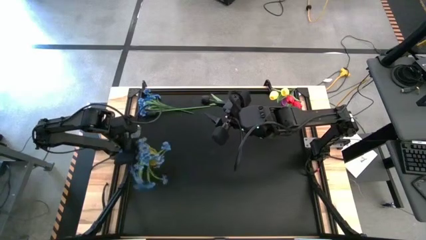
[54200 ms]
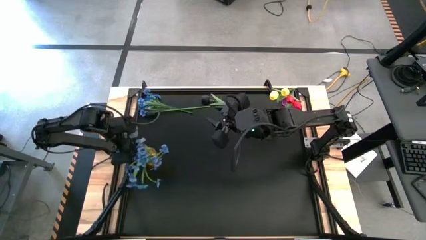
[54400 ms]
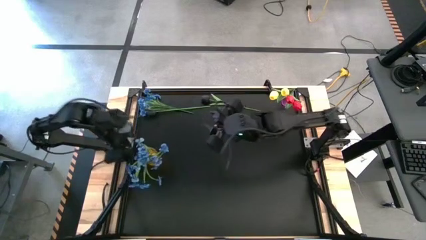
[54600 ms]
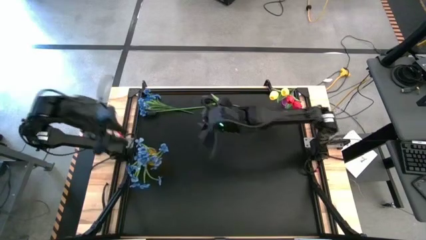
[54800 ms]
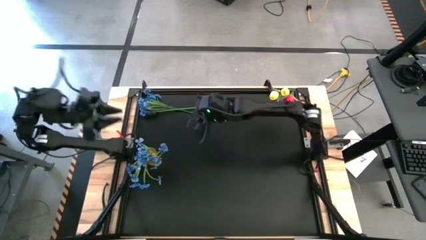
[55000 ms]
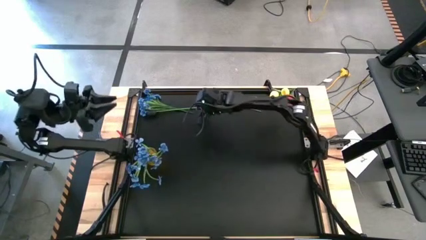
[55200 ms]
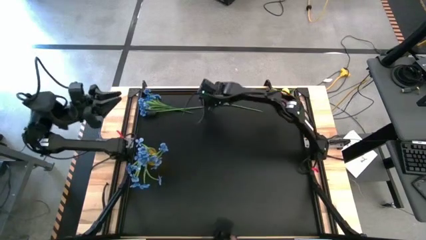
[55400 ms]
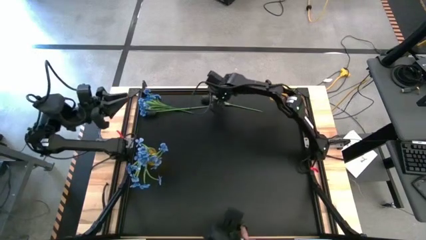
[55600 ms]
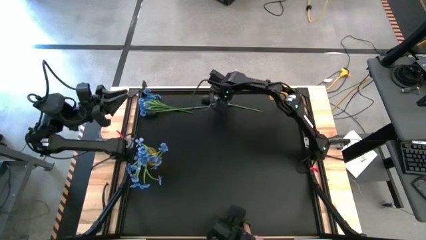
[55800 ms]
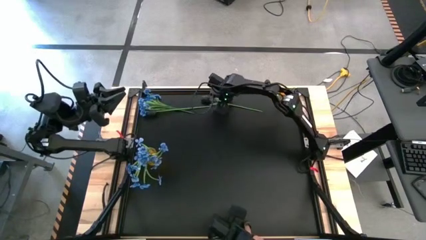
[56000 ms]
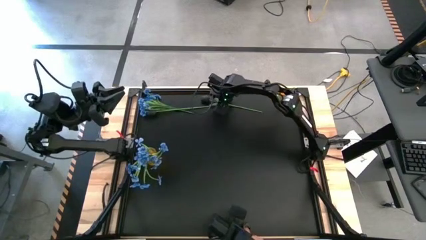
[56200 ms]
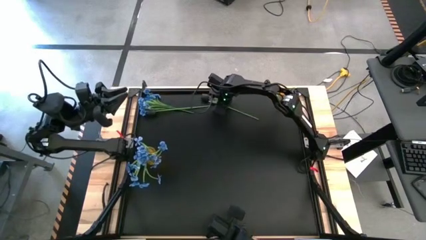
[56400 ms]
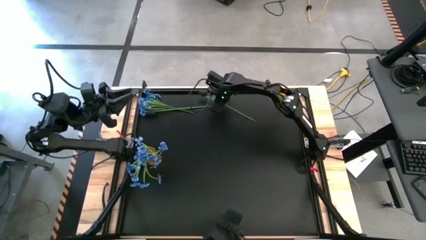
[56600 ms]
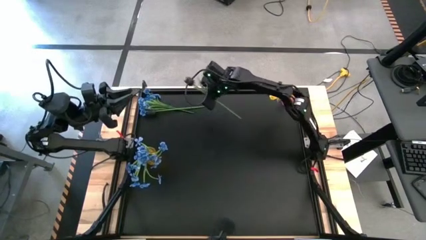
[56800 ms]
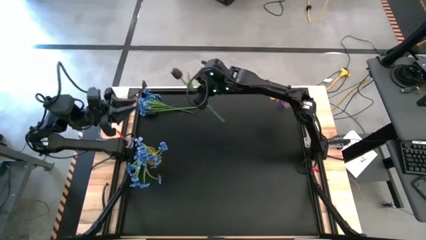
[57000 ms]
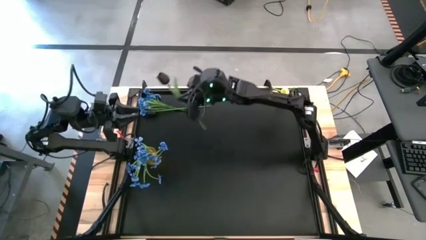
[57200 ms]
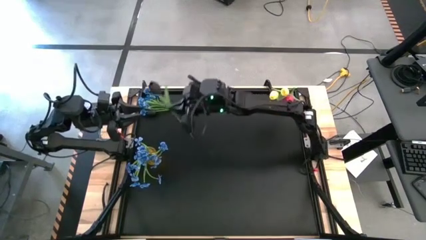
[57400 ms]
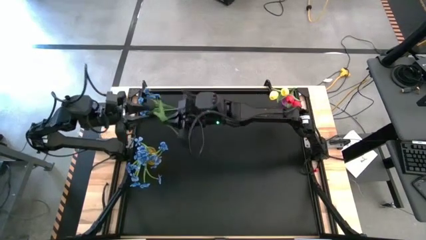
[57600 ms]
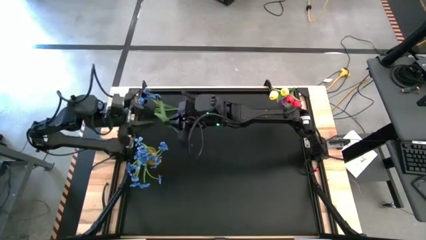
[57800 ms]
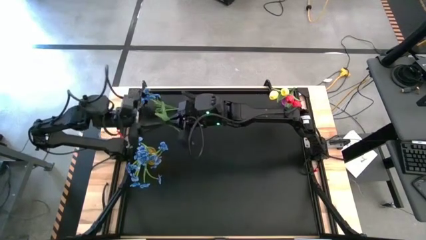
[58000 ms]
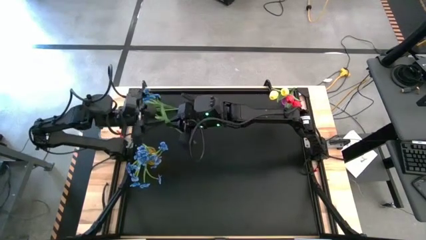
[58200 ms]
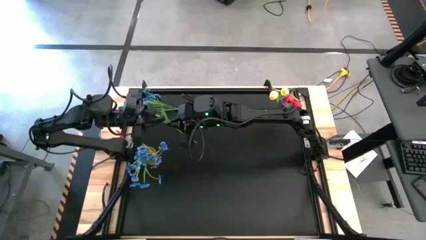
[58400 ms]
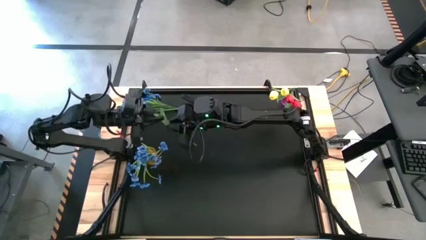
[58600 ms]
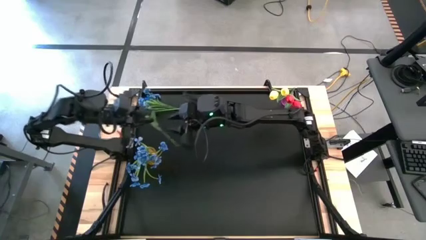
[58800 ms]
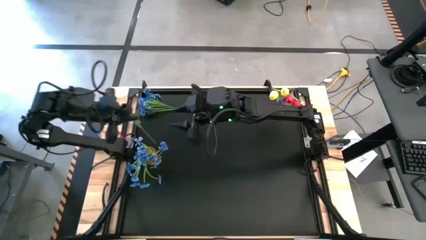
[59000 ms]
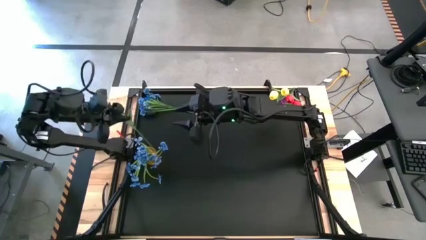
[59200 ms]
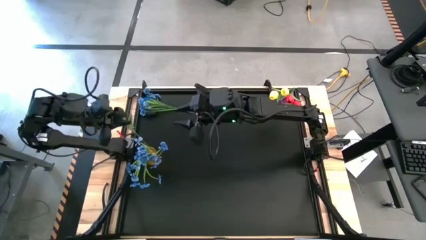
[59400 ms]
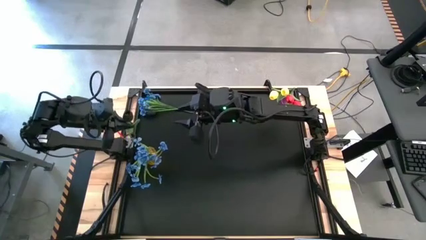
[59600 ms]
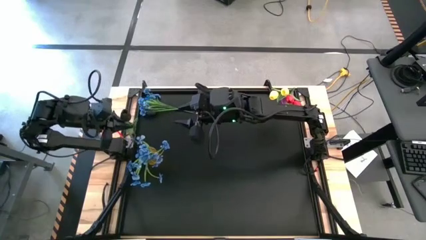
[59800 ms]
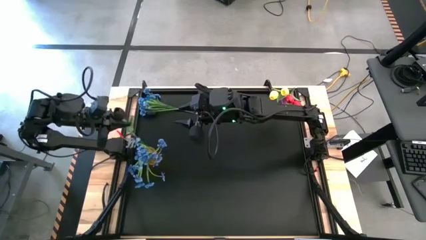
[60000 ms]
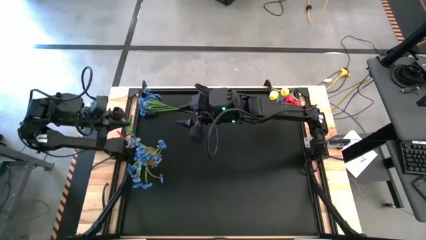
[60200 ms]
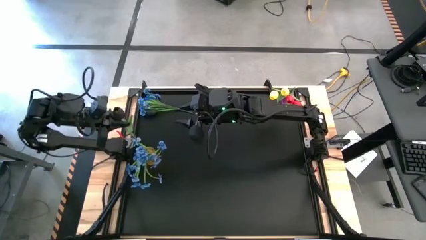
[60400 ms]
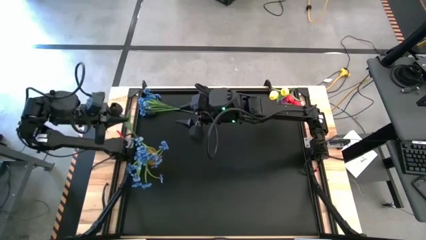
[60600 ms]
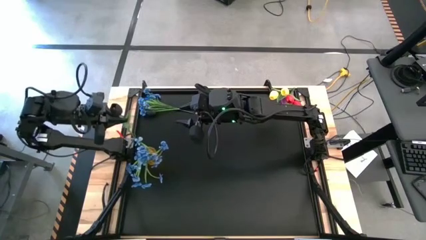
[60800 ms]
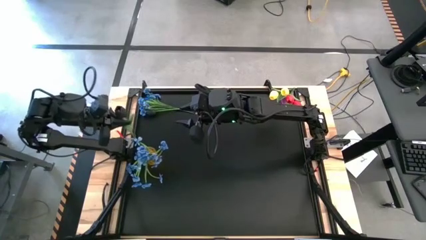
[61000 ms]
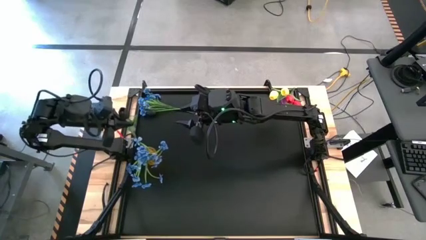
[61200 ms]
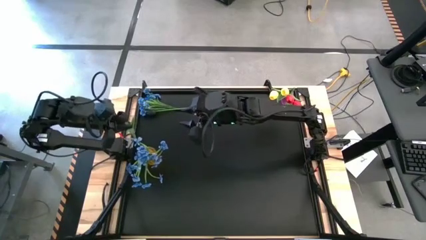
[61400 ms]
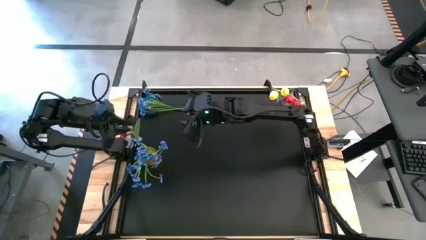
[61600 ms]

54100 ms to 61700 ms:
Task: Sort flowers into vase by color
Put the right black flower into the yellow vase

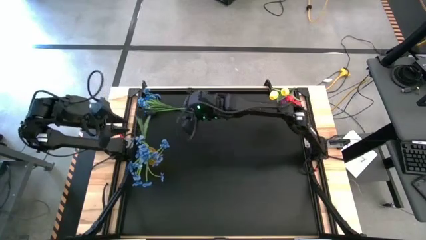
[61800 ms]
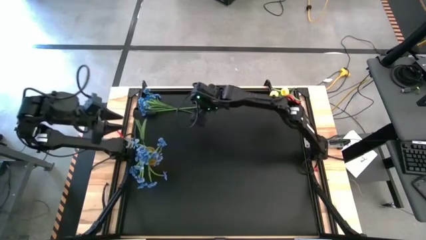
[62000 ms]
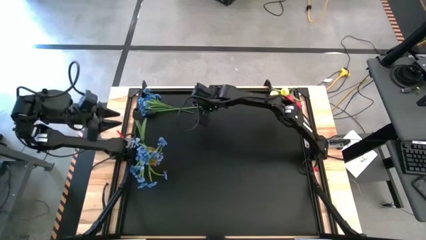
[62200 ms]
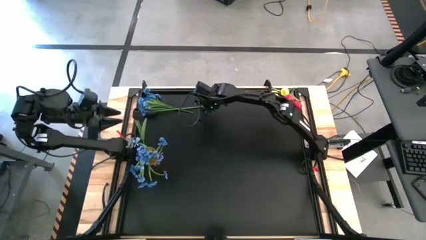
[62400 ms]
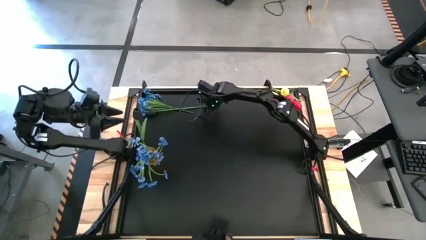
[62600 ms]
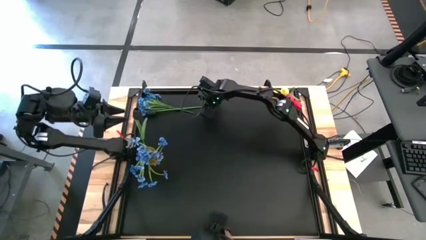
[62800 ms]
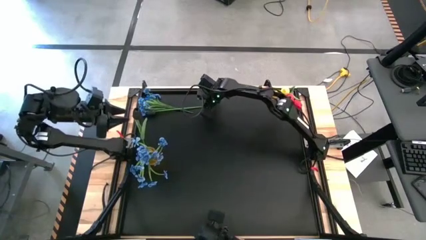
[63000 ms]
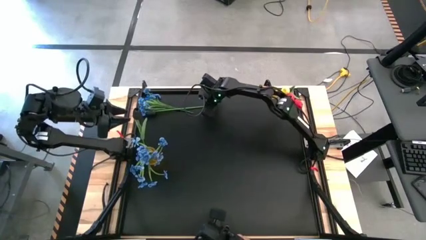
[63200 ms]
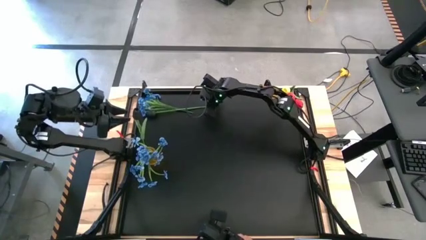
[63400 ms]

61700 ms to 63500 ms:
Put the black flower into the yellow vase

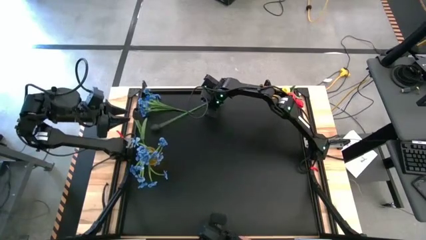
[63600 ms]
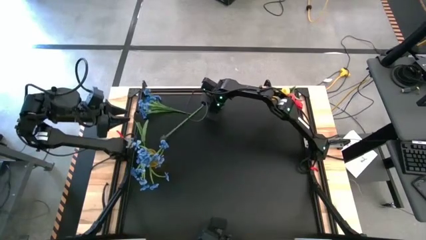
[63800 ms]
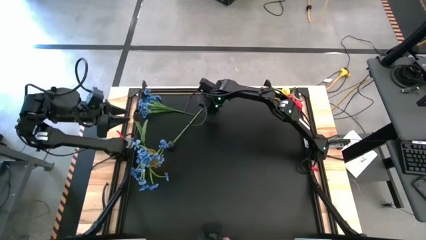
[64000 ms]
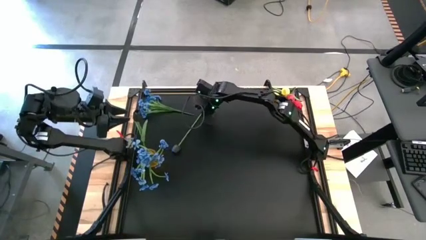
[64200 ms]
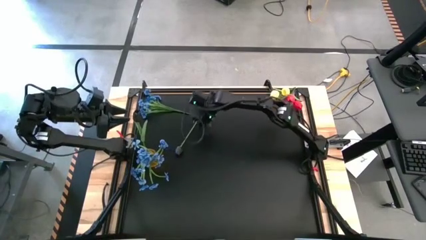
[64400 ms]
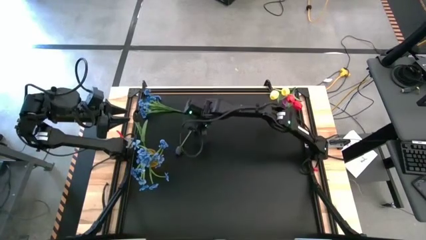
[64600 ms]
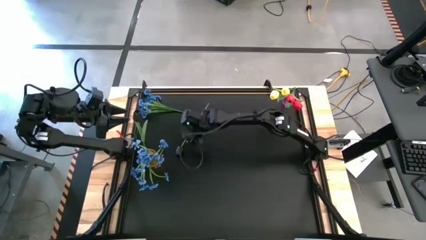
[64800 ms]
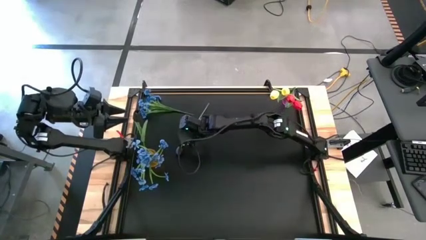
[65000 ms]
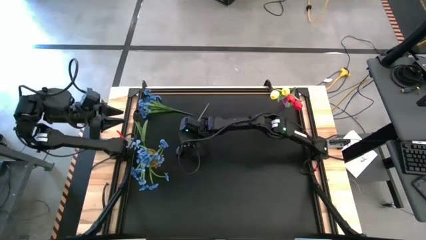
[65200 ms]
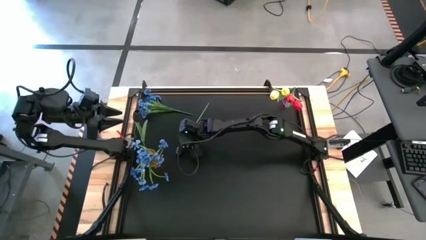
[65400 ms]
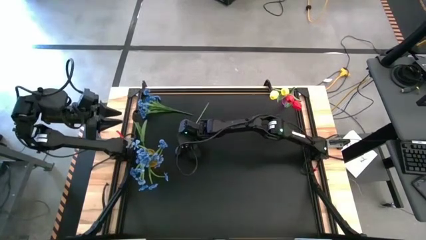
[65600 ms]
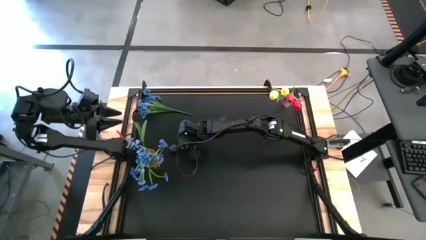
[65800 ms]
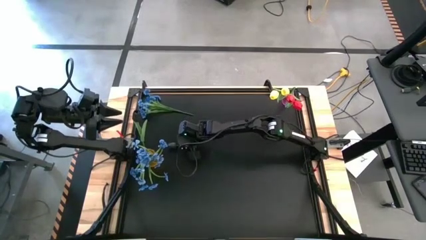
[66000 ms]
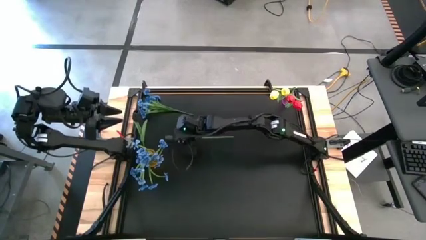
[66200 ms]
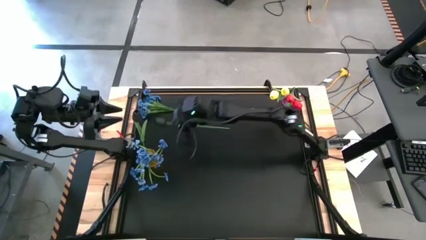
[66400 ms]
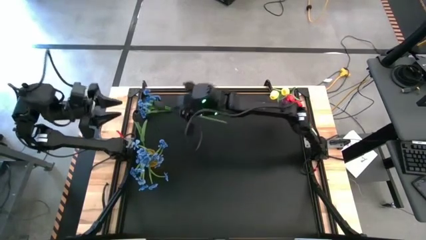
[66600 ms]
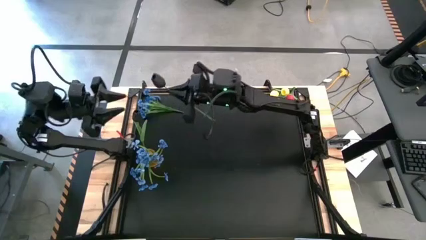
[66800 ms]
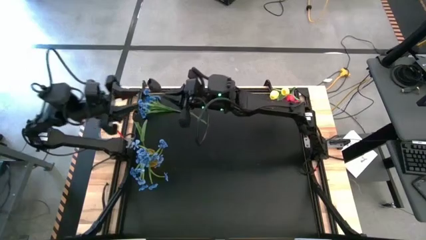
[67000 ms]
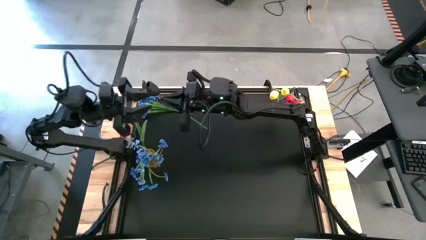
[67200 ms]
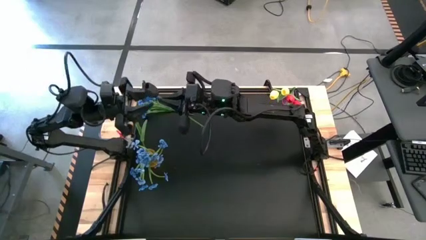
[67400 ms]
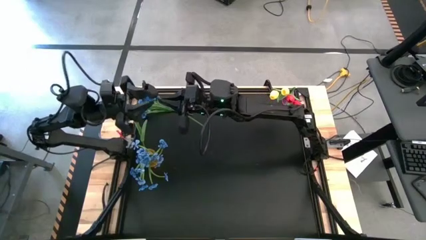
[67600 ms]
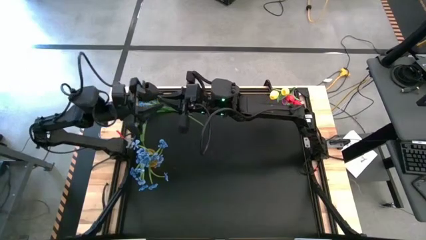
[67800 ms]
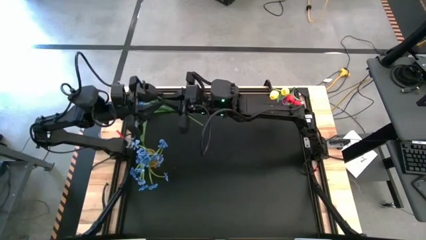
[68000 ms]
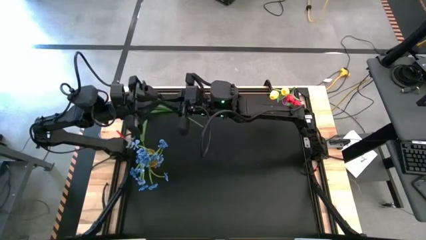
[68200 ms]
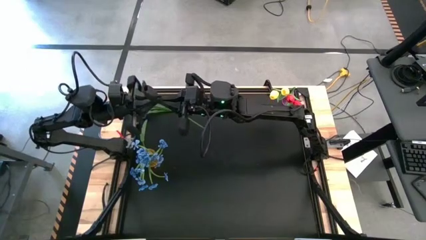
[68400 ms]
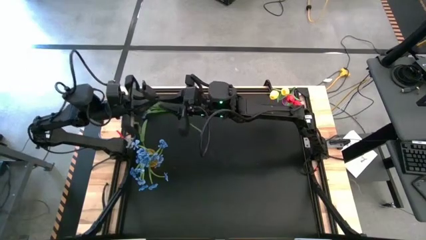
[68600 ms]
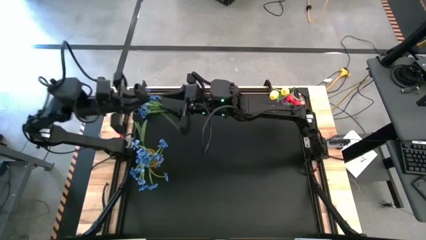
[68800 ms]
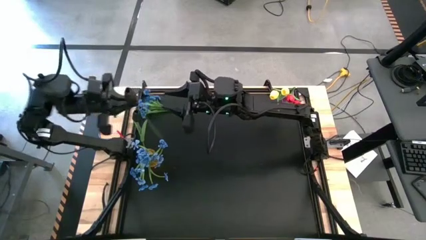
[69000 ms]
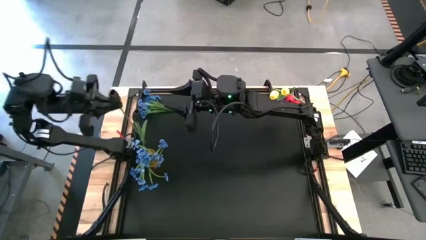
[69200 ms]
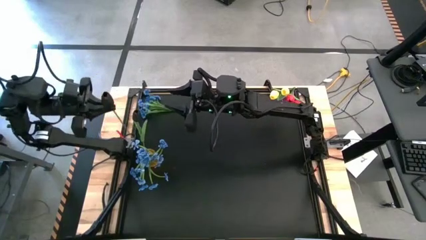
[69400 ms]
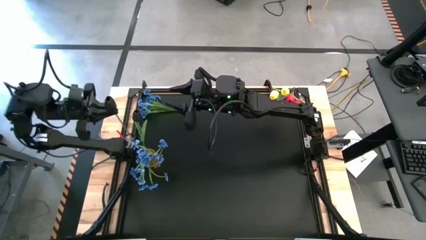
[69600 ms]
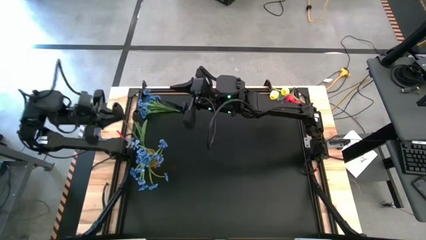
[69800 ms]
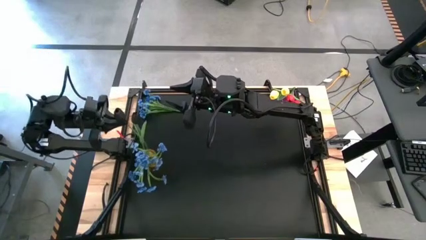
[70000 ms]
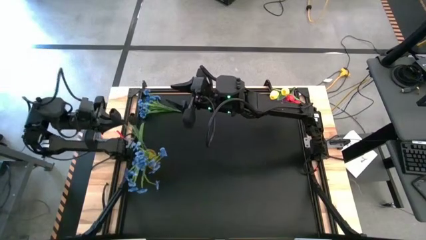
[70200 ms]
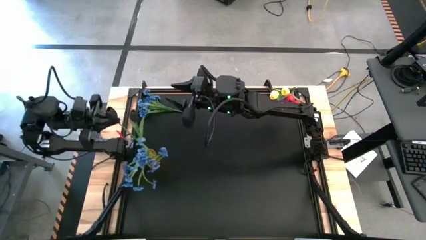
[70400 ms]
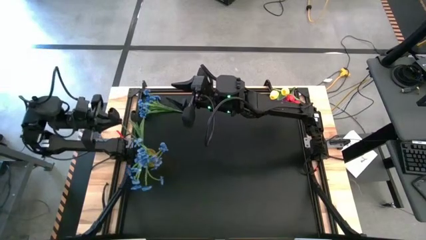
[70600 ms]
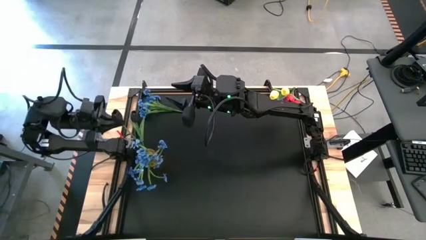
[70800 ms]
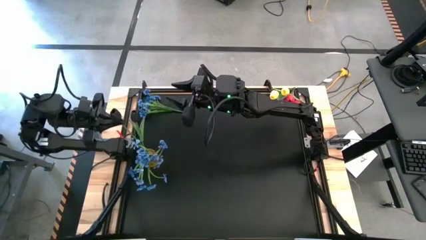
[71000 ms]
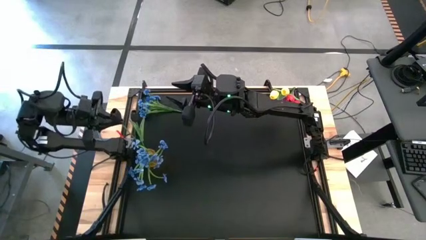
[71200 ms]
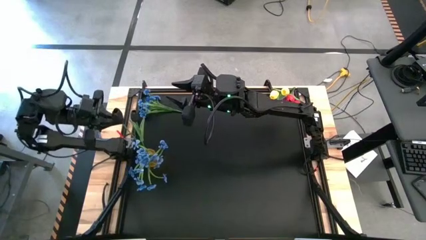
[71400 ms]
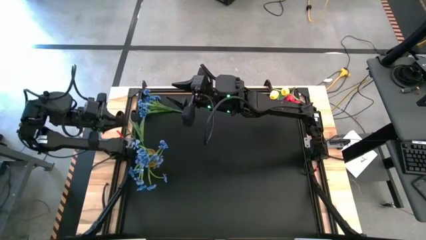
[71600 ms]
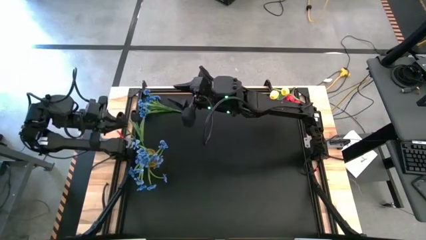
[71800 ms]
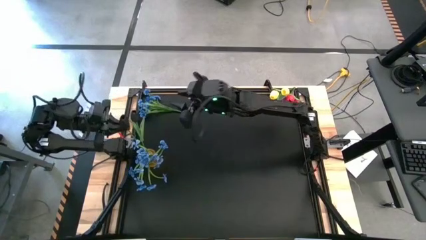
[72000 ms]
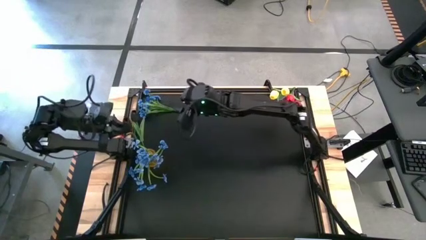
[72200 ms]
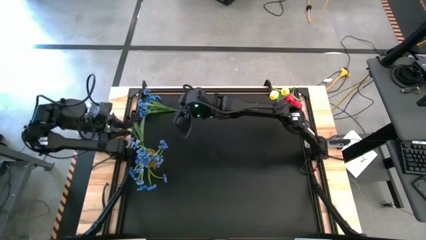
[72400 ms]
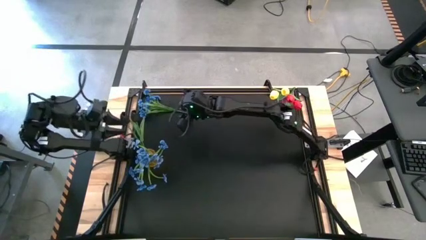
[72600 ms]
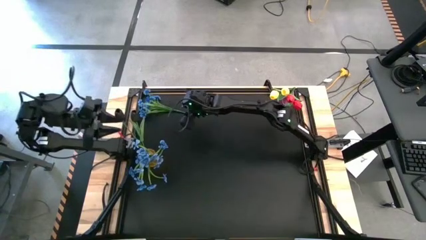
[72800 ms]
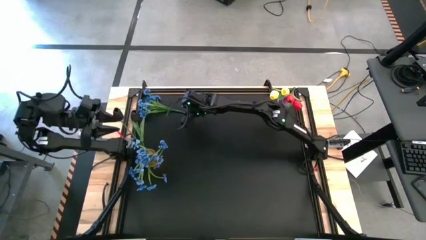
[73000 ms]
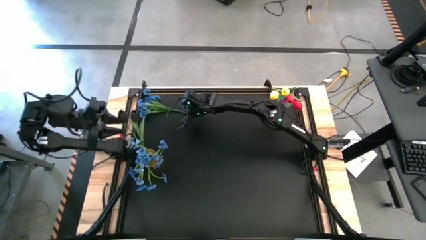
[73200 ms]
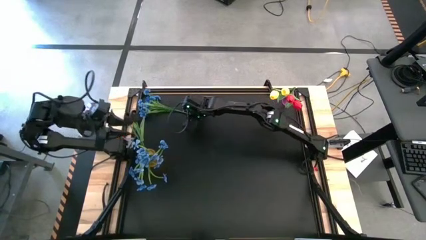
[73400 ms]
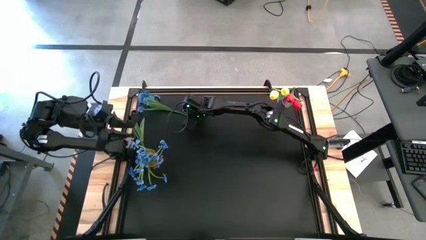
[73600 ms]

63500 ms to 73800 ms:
Put the black flower into the yellow vase
